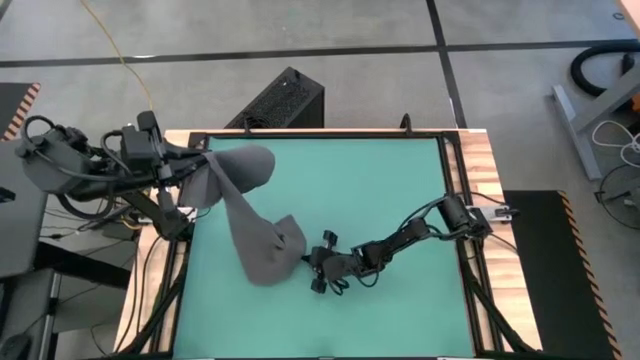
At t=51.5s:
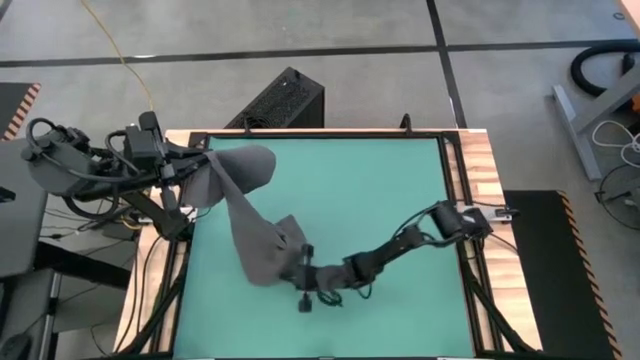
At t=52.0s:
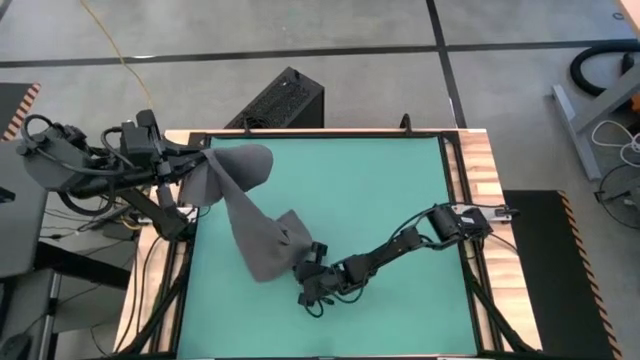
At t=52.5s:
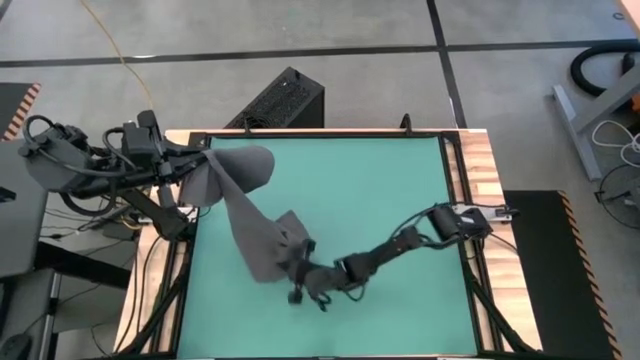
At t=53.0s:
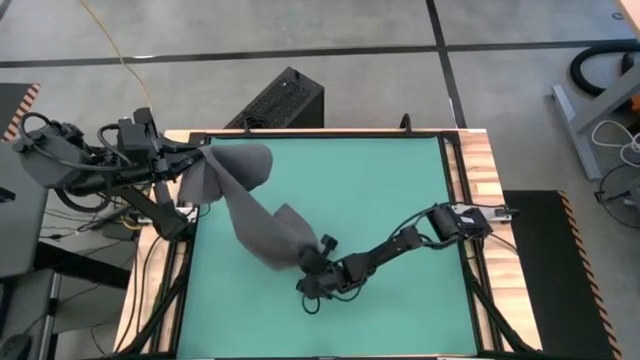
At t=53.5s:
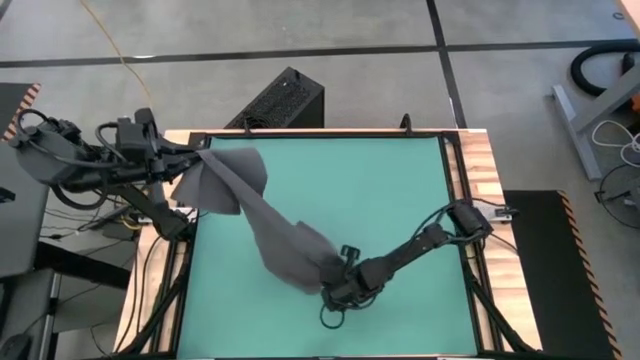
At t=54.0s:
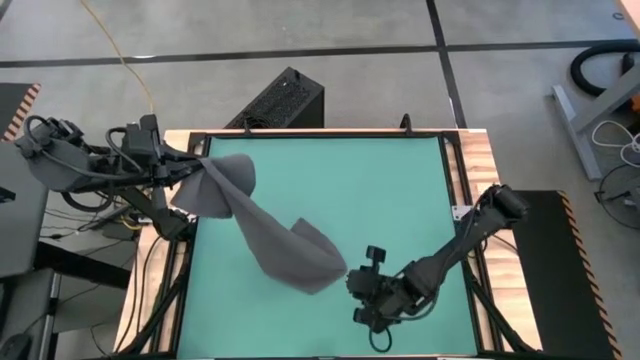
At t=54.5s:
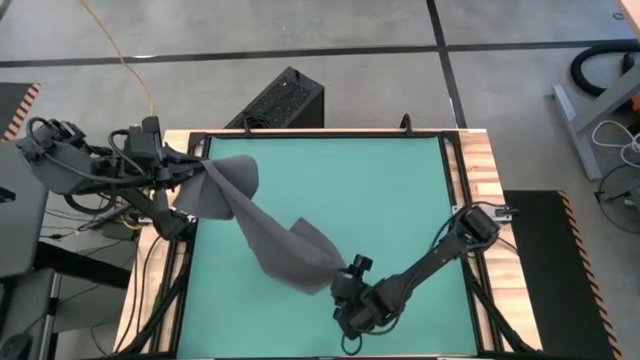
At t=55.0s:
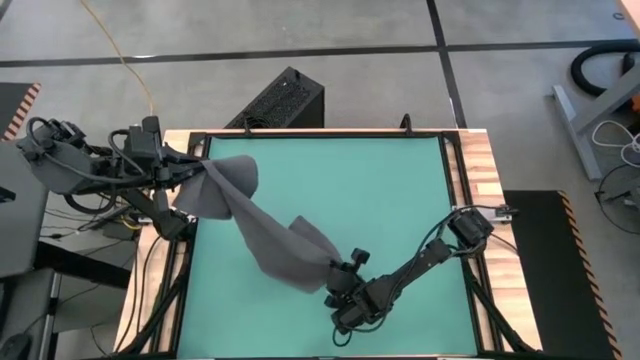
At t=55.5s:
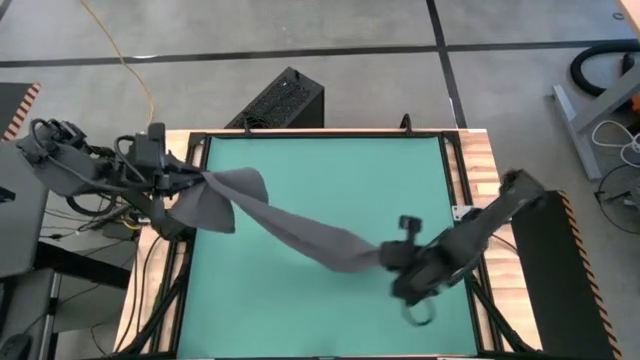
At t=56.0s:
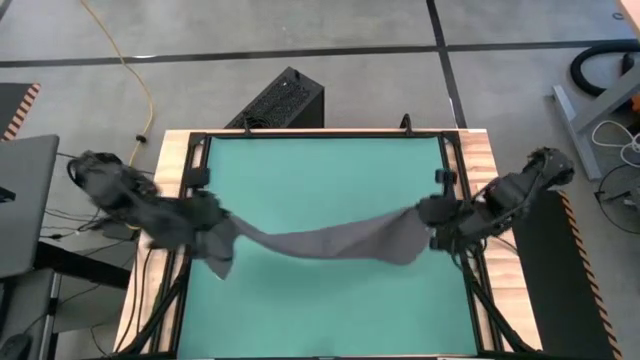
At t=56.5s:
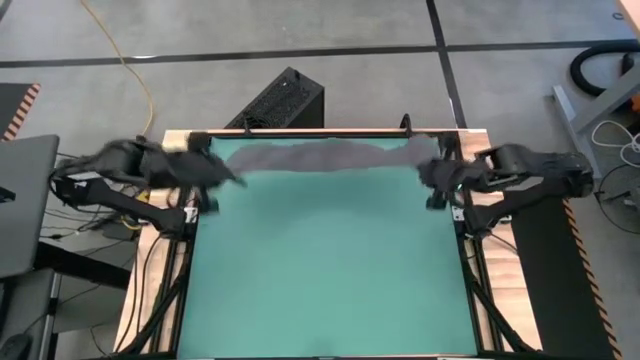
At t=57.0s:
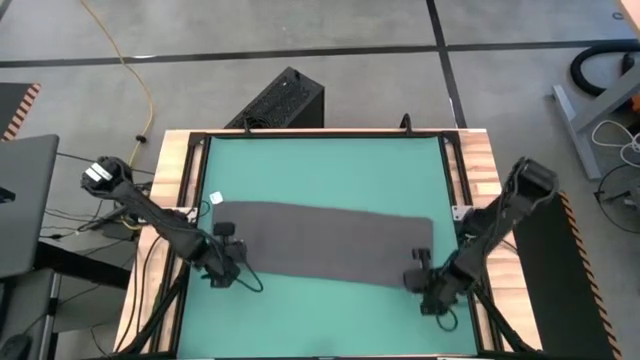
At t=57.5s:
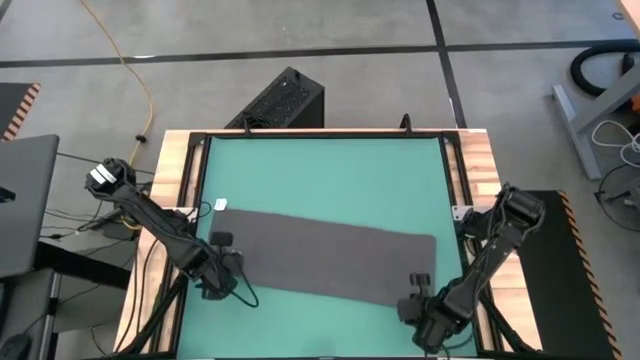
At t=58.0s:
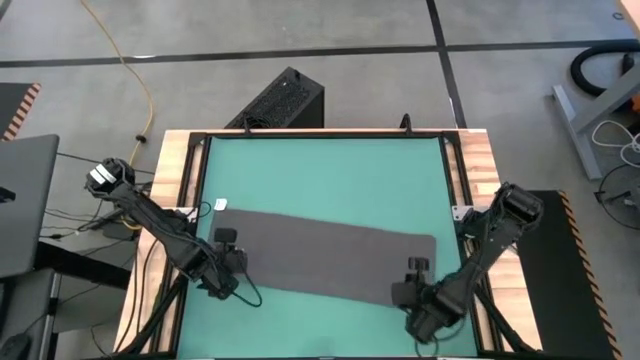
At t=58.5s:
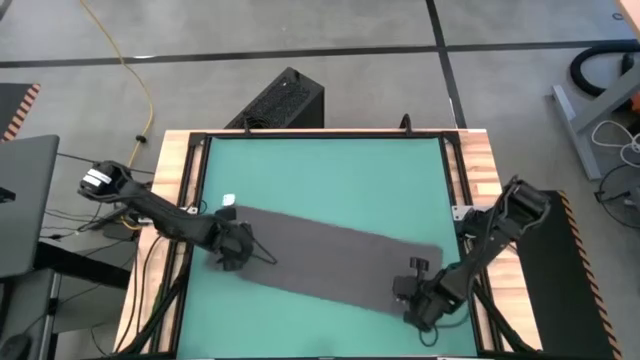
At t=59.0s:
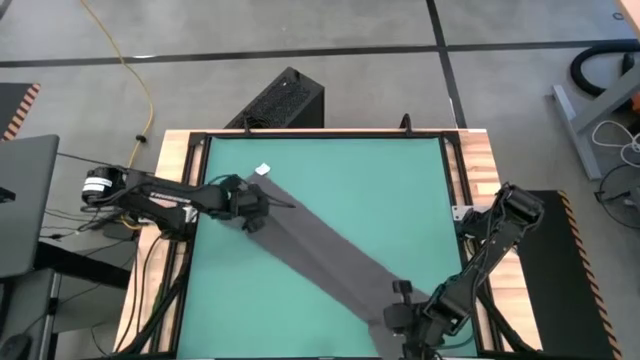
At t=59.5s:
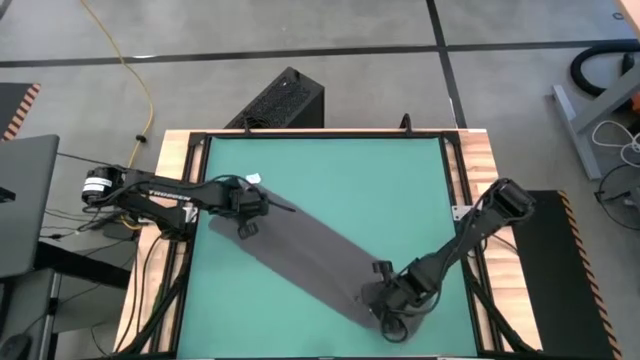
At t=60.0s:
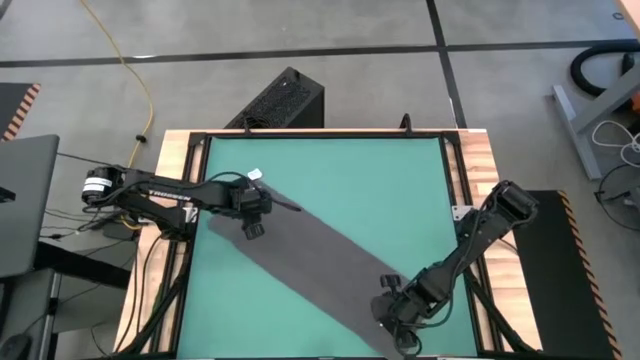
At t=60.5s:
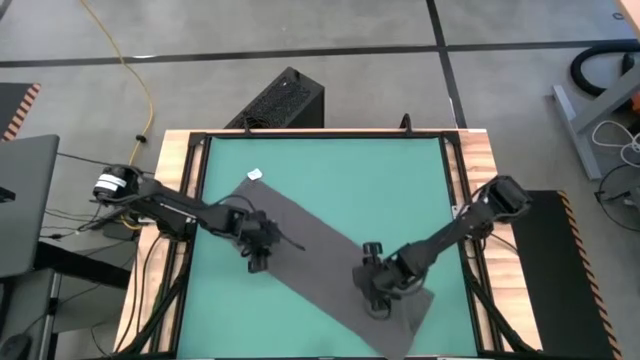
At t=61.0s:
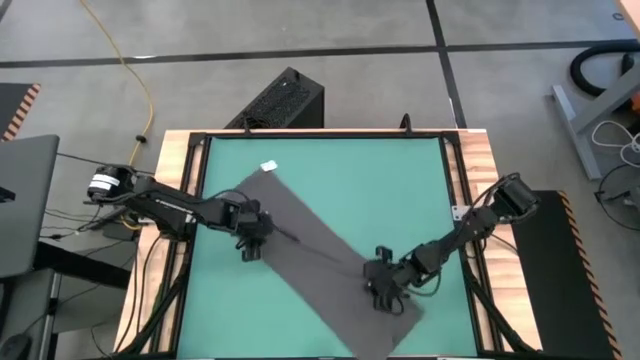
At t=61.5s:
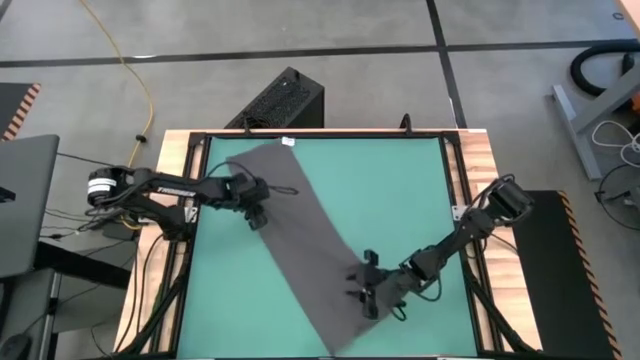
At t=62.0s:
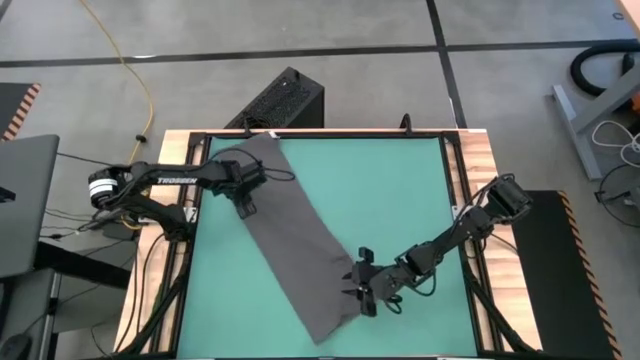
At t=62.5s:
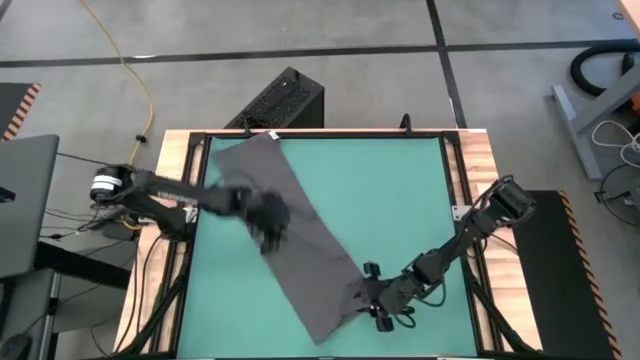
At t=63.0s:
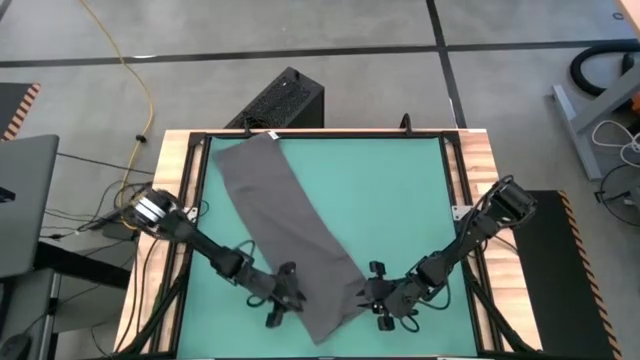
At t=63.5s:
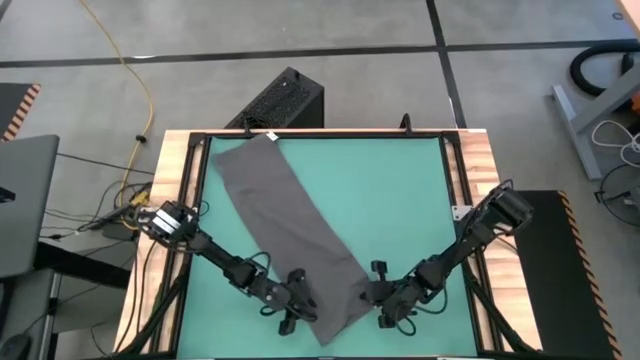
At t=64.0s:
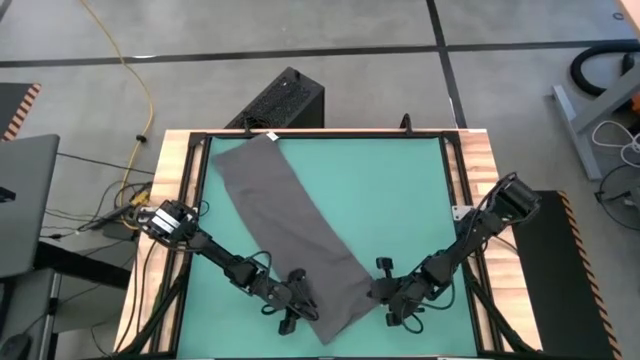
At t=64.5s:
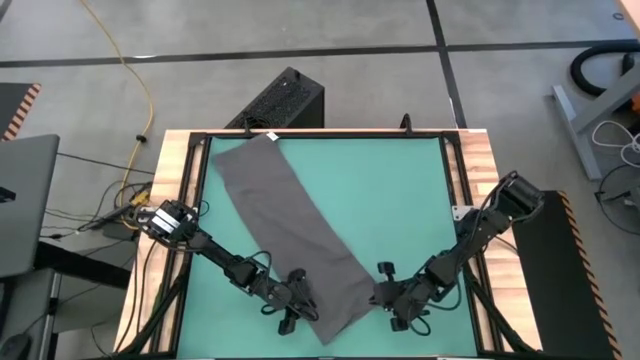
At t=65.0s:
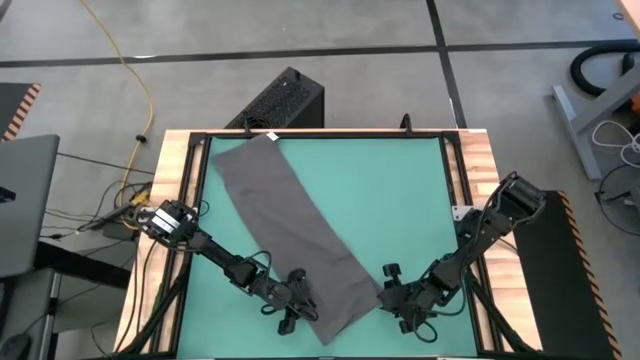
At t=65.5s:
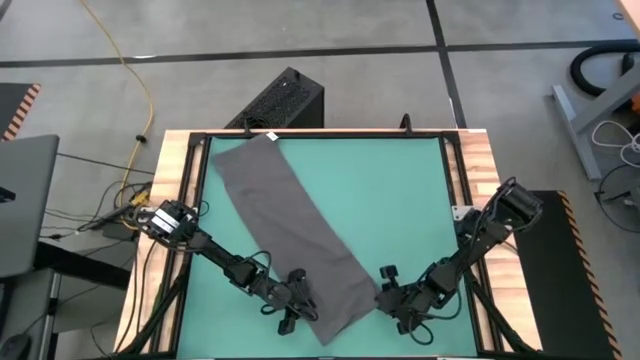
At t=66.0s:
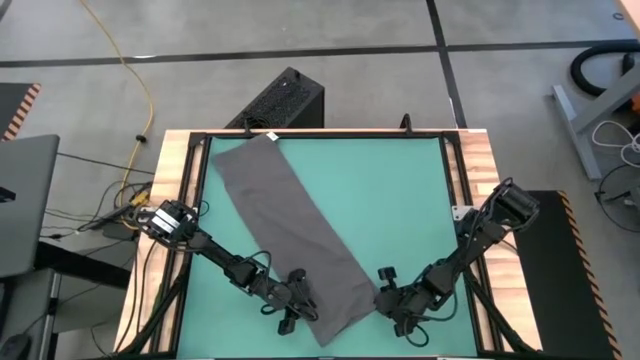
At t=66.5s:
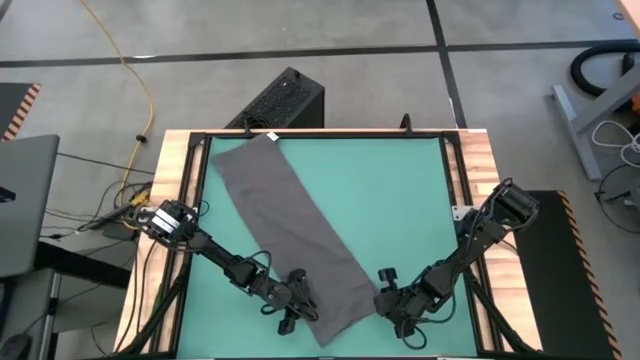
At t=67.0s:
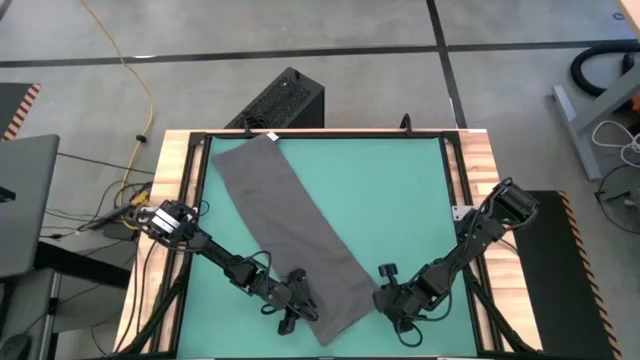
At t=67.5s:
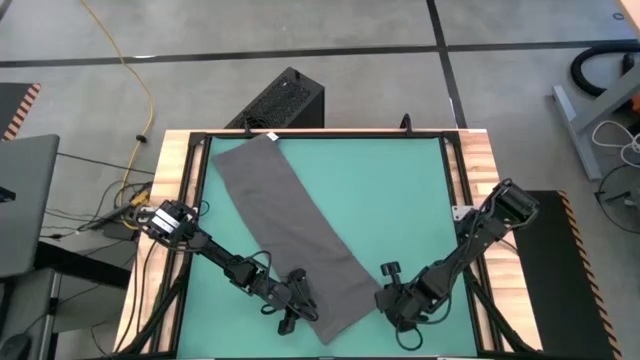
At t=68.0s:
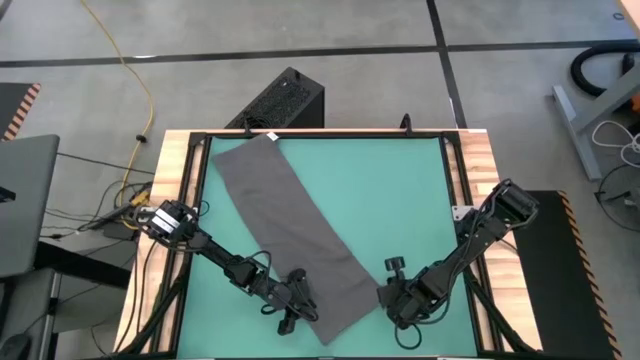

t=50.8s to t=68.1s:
Task: Roll towel
Fold the gray towel

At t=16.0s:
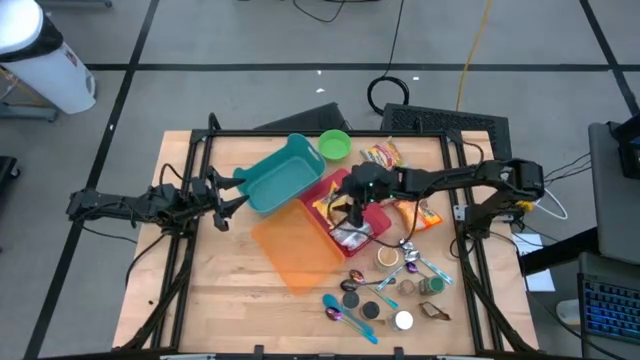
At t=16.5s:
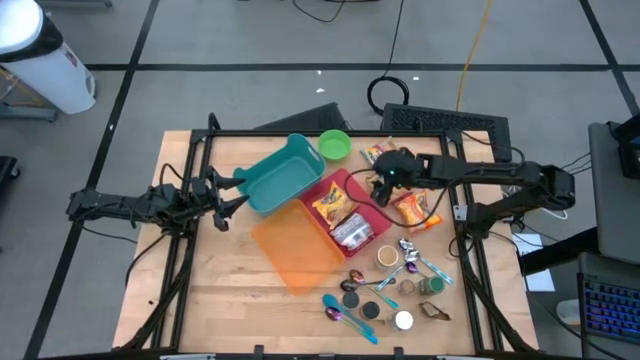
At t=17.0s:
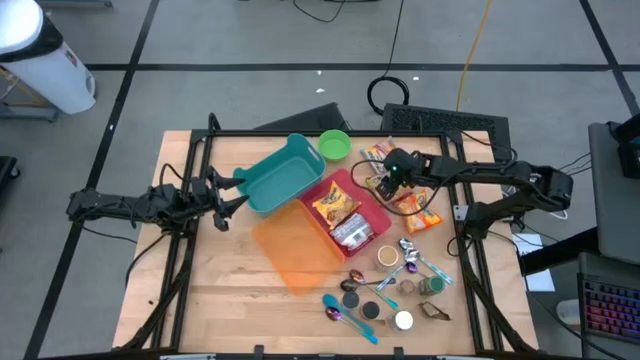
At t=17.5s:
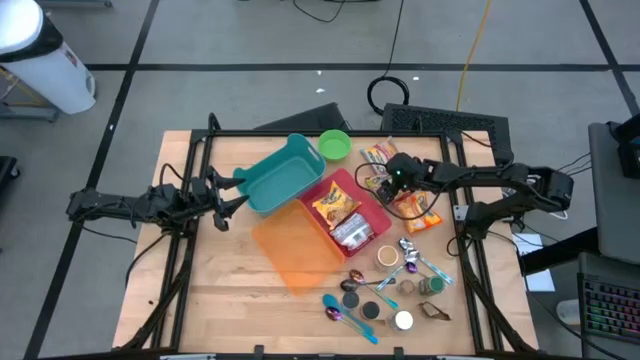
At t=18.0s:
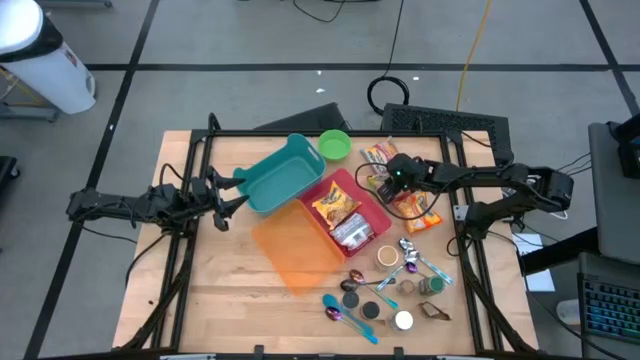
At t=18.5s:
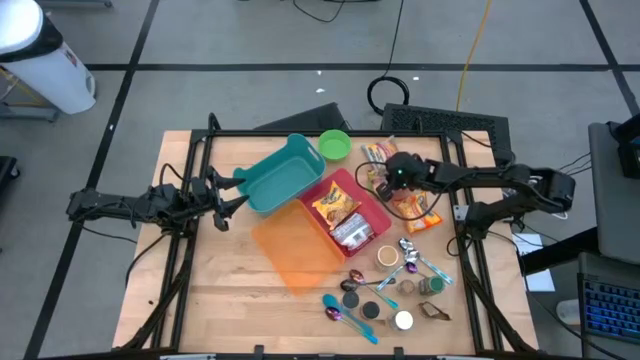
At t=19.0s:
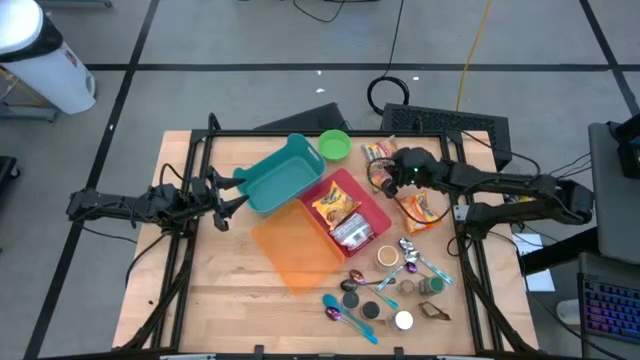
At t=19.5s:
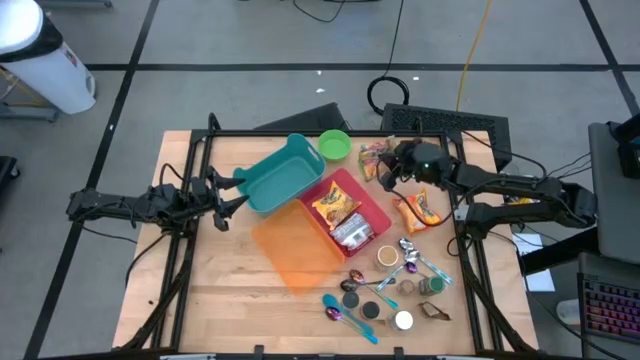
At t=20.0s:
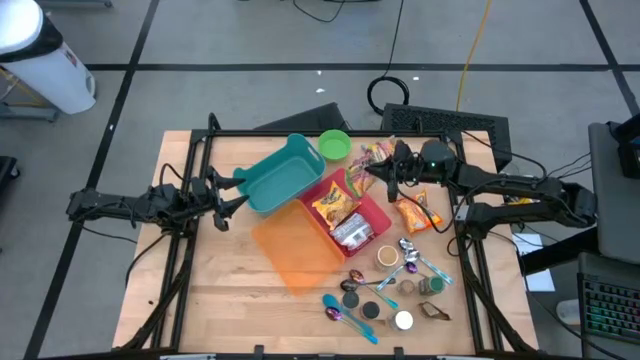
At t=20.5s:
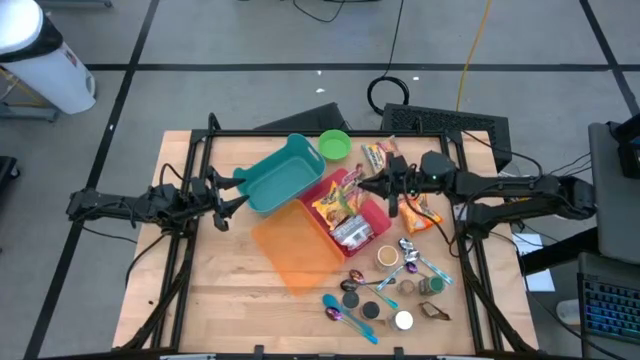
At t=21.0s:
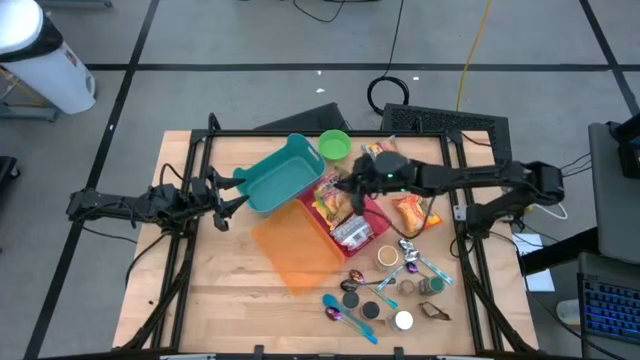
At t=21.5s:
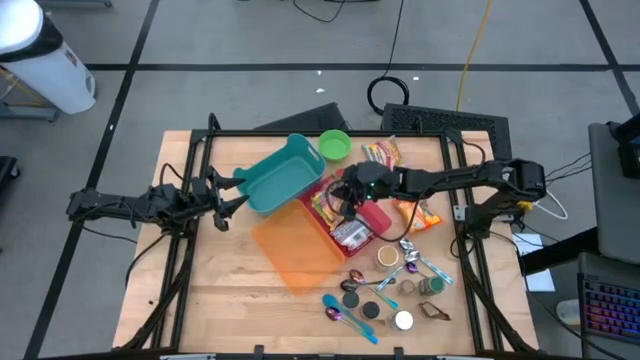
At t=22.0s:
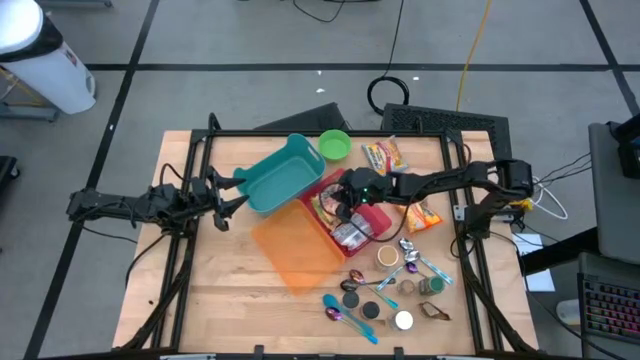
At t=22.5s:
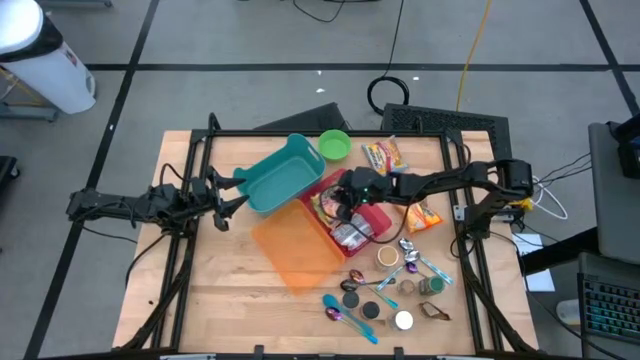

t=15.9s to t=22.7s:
Task: Pick & Place Food Item
Put the green noodle pack into the red bin
